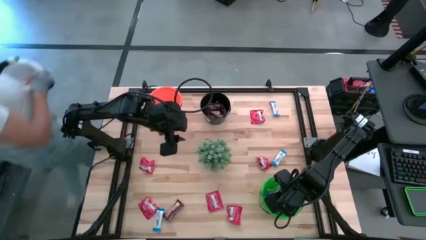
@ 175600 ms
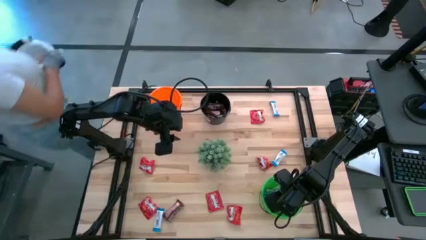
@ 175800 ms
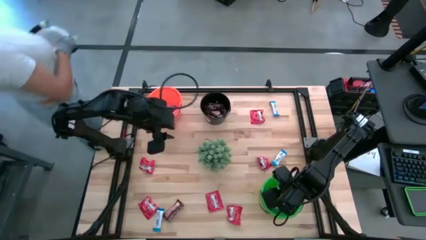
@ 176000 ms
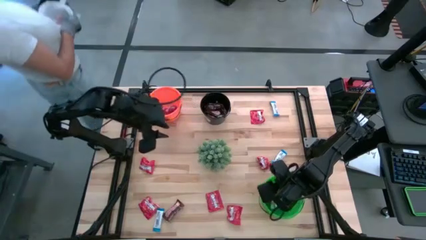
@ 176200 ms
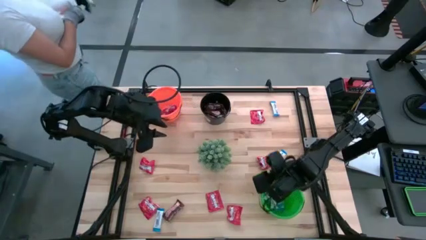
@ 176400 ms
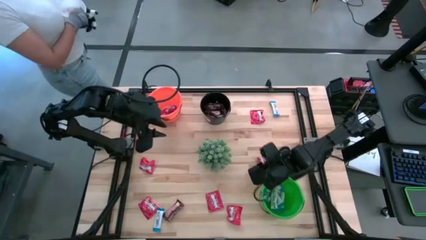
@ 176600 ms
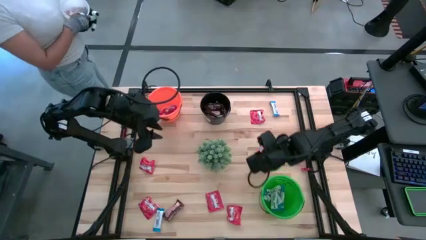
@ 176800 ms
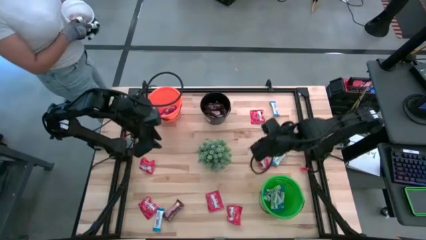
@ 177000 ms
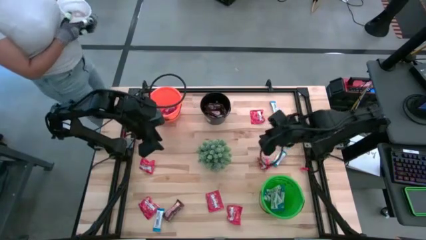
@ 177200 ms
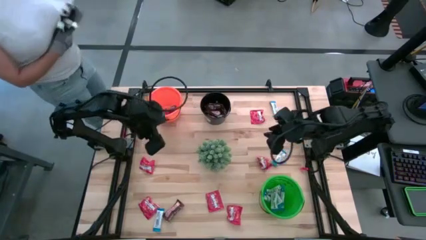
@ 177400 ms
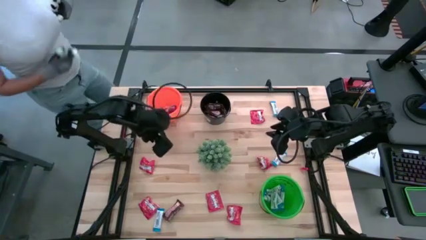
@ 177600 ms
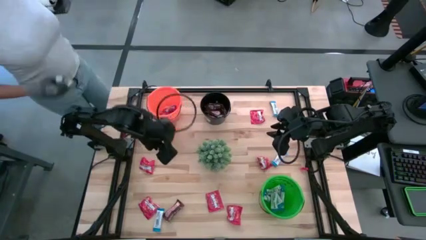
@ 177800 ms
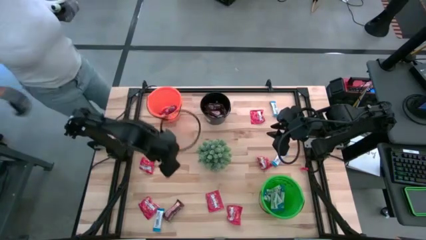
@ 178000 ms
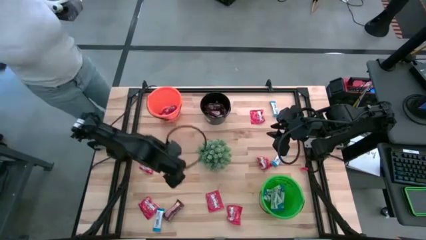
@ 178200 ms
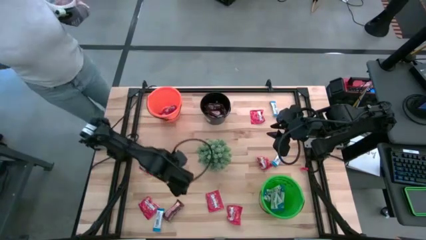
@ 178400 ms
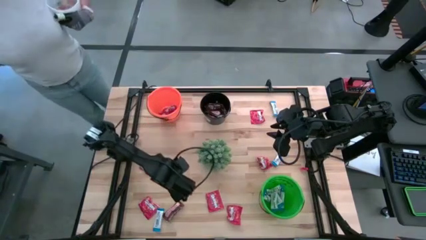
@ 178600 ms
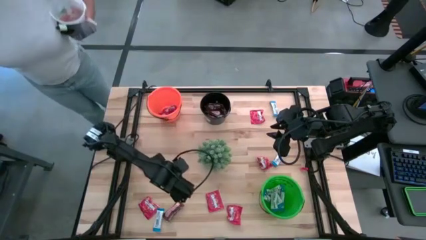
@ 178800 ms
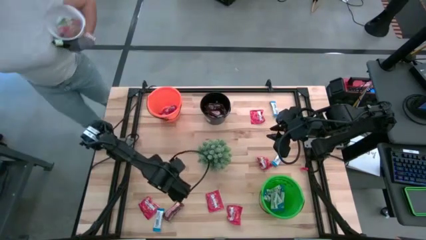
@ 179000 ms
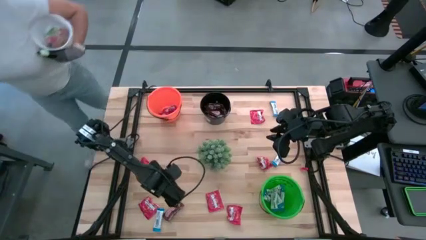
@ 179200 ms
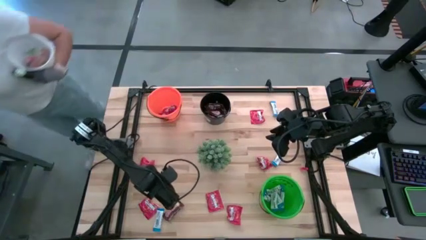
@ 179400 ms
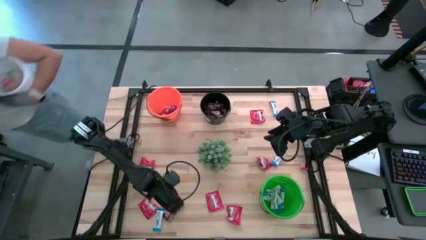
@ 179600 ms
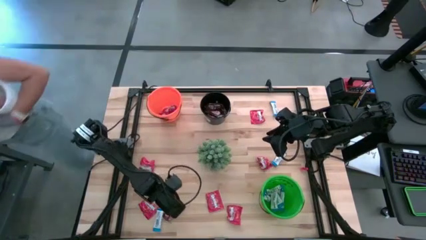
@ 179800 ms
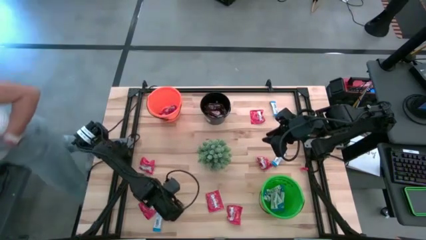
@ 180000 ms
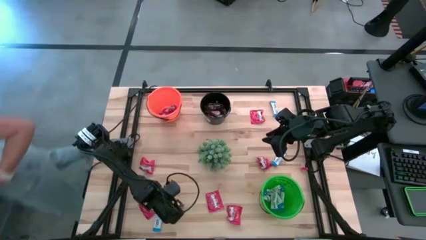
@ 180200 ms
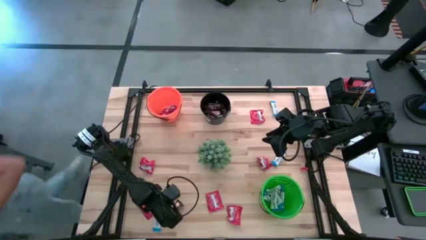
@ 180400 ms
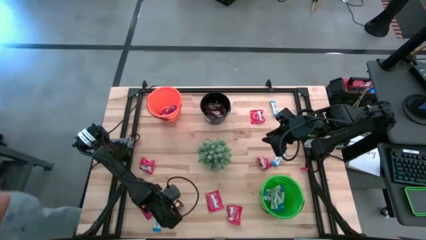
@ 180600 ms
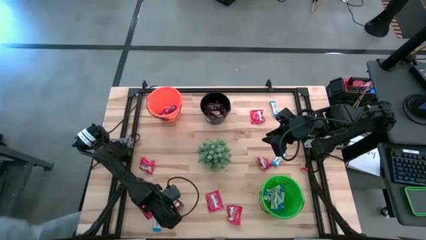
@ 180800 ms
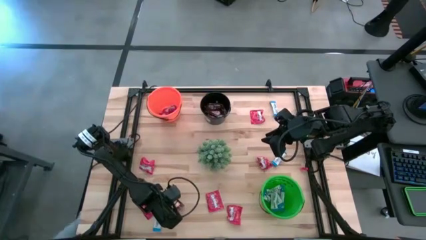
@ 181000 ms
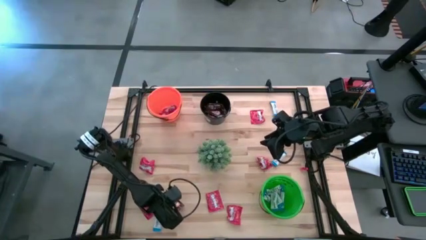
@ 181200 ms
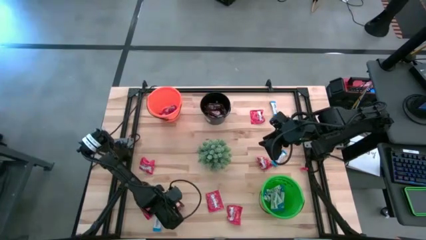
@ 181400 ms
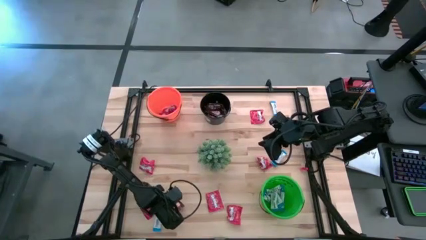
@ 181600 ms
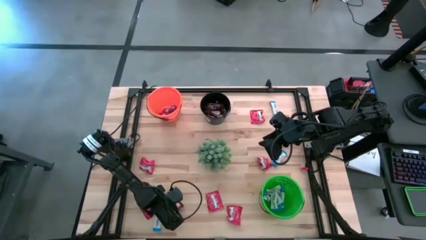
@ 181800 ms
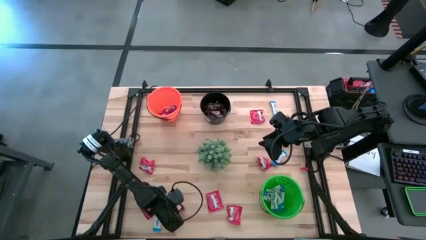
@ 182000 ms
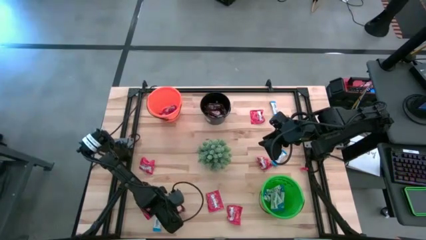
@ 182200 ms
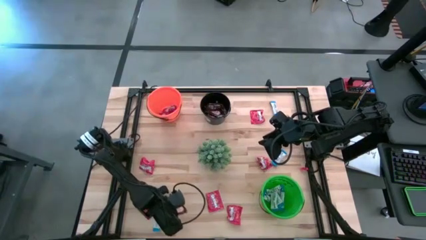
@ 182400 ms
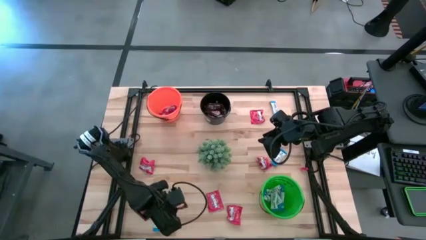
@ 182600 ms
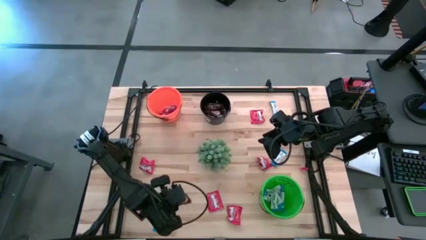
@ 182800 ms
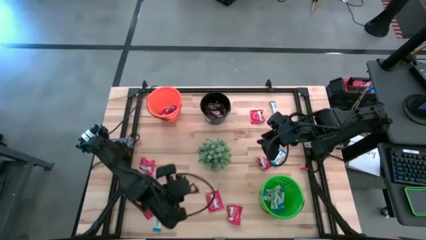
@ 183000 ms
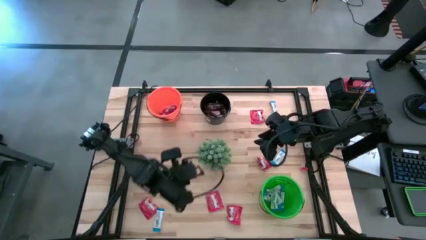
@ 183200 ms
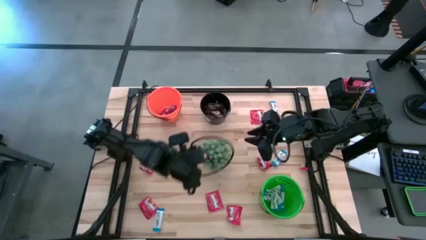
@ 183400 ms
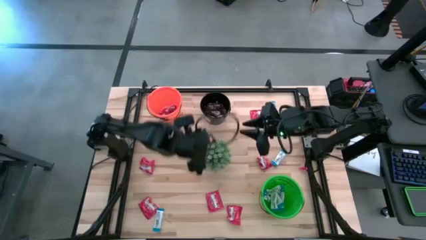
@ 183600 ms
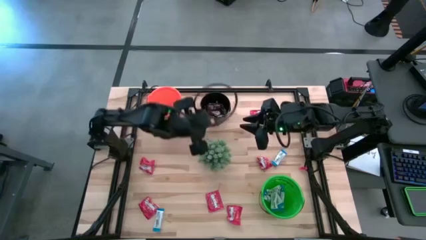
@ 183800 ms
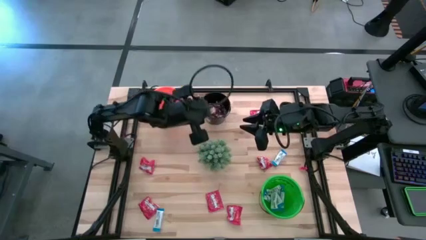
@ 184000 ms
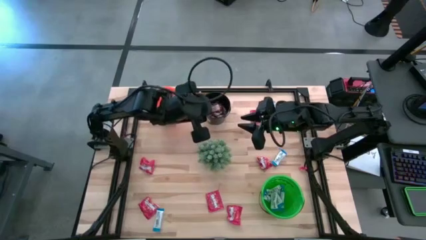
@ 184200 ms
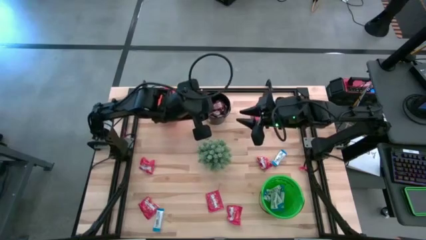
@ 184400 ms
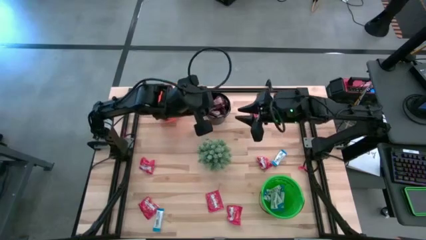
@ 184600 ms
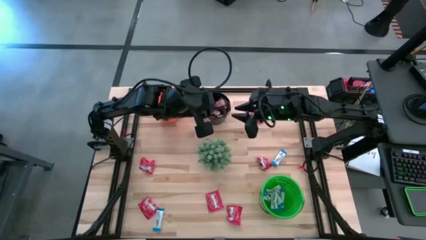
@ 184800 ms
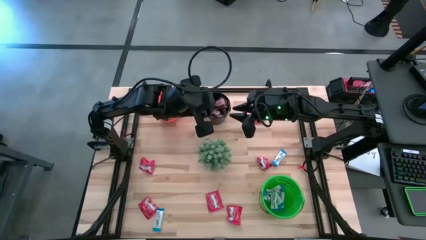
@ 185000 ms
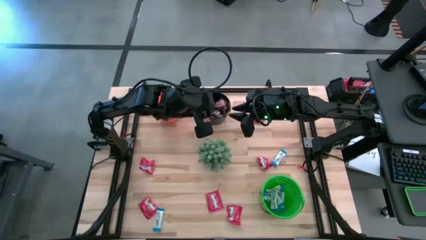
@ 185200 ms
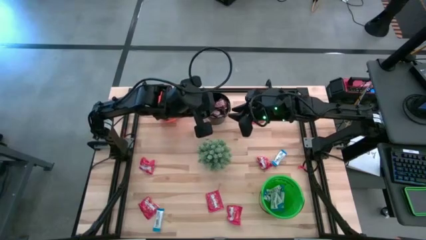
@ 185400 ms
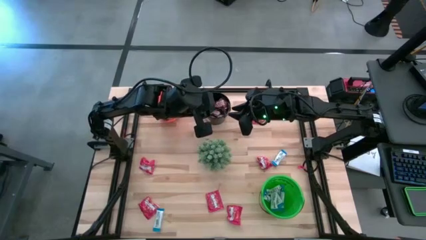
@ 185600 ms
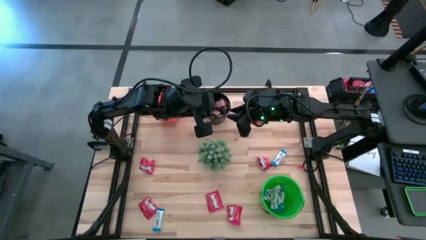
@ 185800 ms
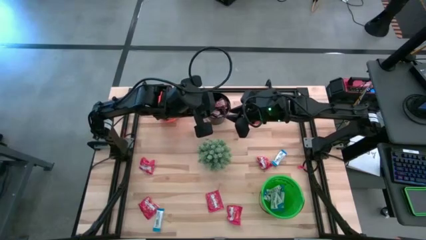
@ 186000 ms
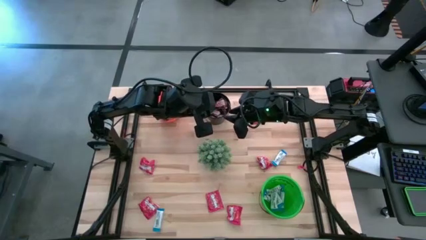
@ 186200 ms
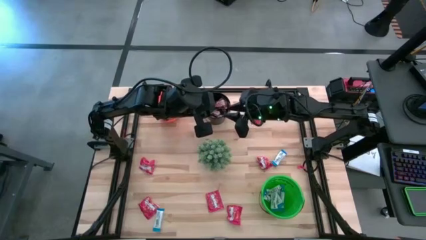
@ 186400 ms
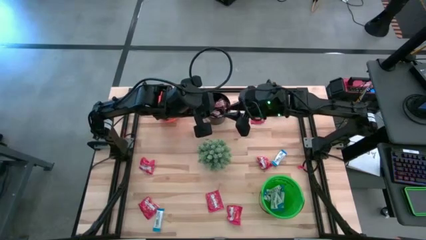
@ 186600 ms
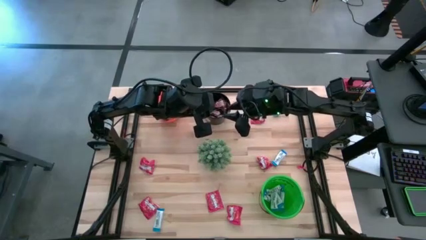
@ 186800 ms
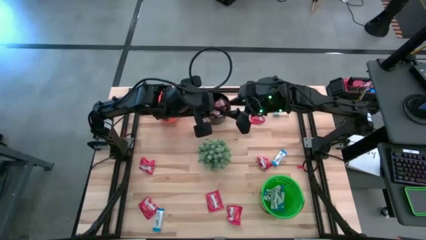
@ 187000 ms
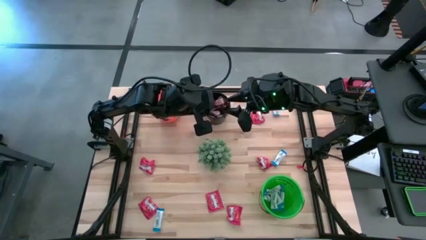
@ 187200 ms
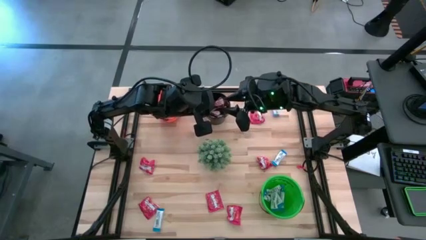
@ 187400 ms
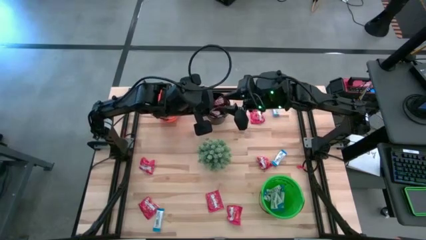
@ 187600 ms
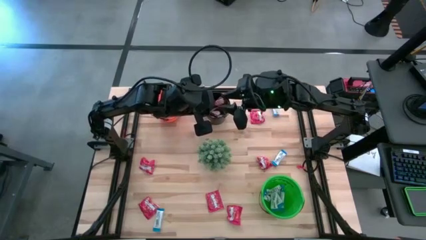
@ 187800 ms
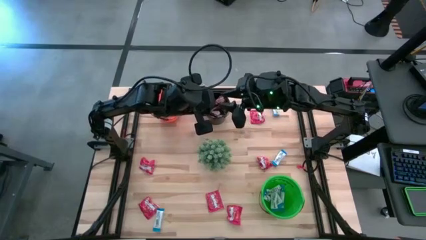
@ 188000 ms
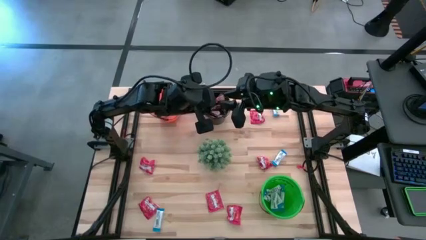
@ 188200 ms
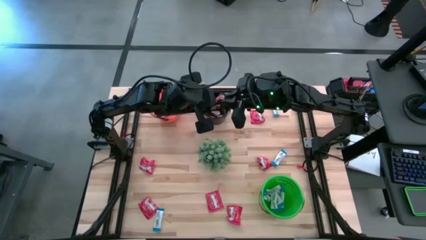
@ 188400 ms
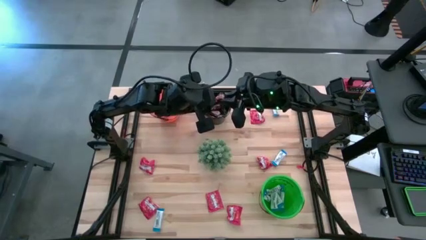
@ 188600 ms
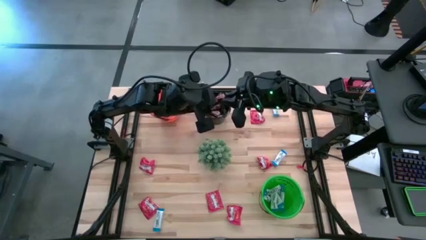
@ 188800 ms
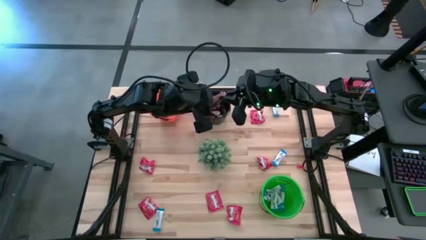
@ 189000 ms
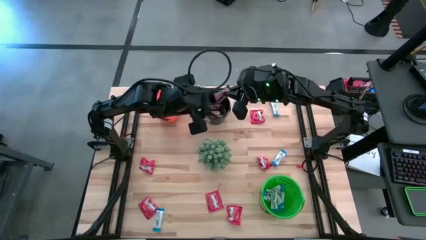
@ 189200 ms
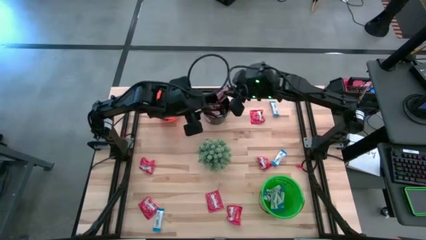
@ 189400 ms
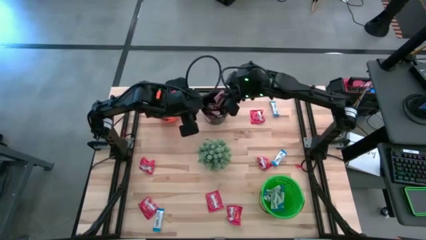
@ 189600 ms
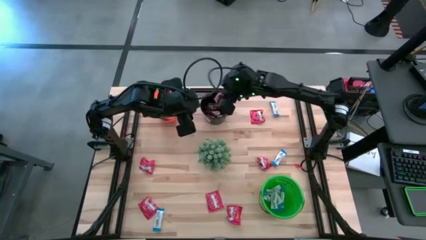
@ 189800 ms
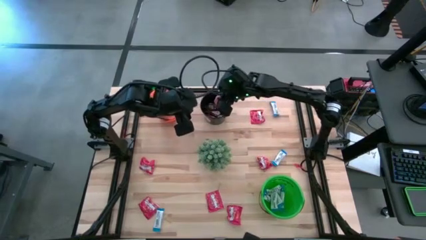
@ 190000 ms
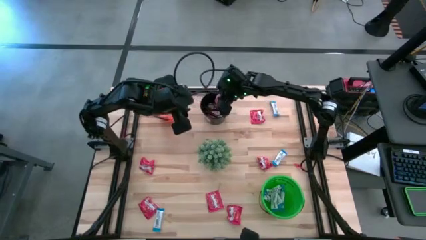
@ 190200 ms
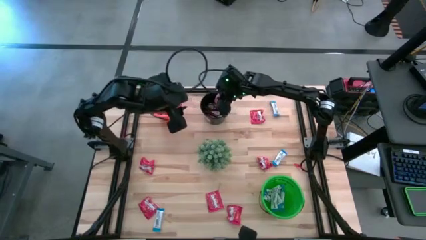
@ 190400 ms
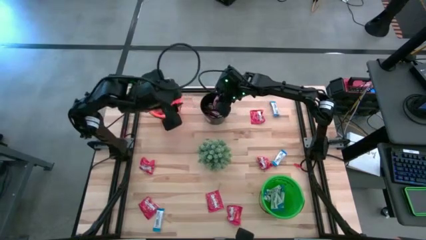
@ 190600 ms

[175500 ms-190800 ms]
Task: Sort candy
Put the brown chocolate into the black bucket

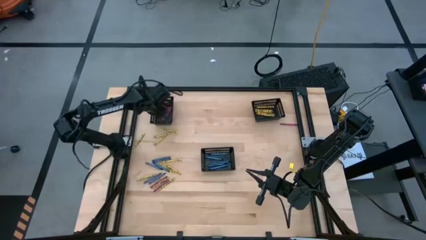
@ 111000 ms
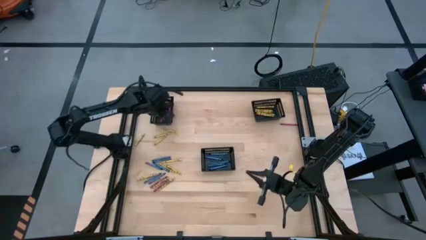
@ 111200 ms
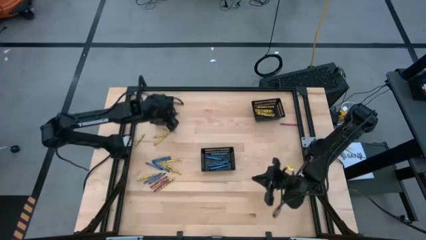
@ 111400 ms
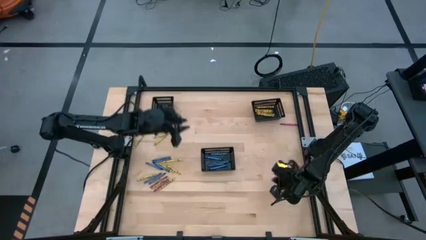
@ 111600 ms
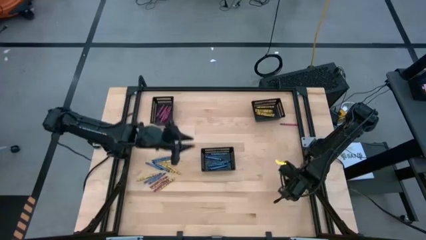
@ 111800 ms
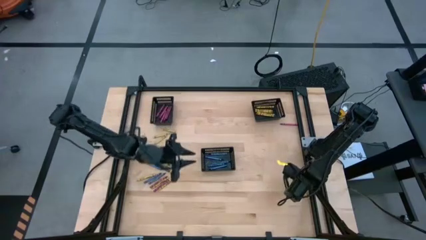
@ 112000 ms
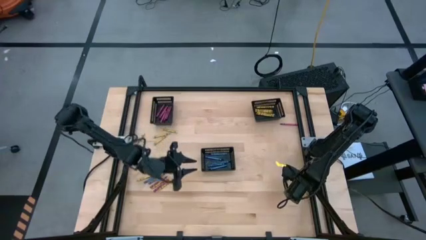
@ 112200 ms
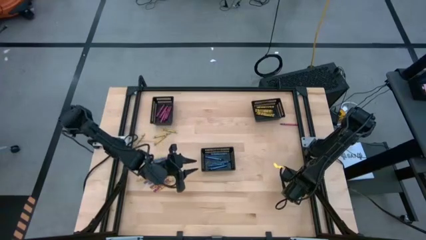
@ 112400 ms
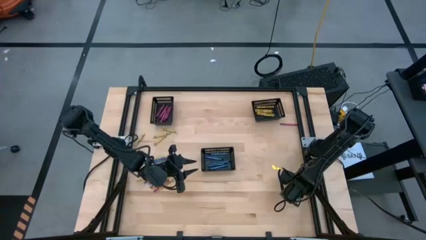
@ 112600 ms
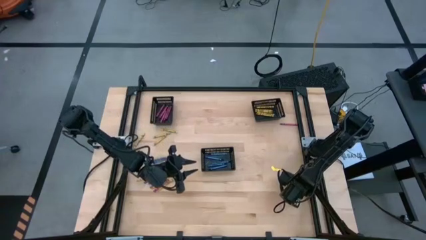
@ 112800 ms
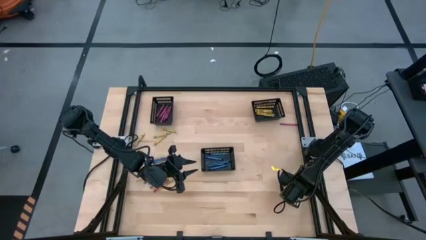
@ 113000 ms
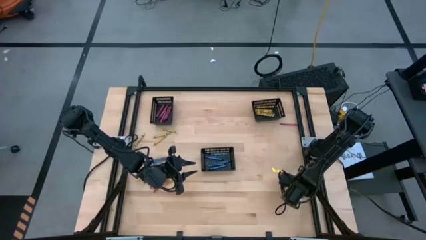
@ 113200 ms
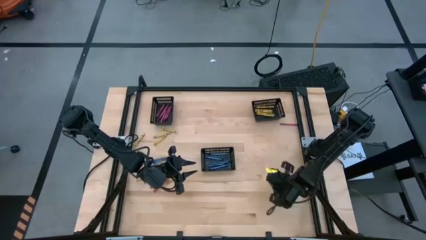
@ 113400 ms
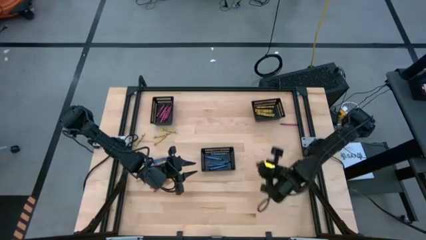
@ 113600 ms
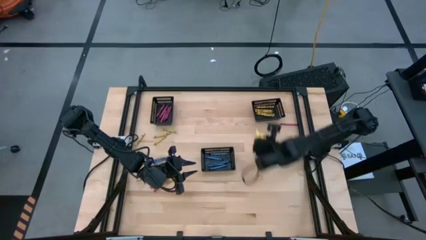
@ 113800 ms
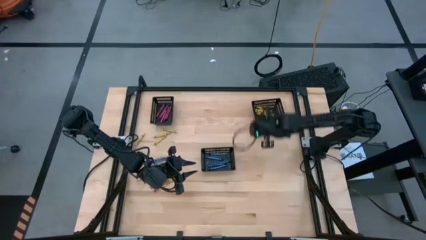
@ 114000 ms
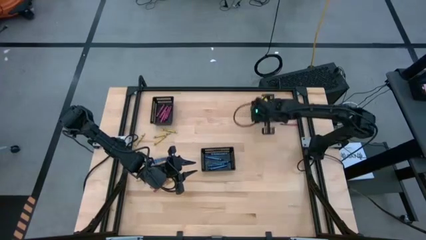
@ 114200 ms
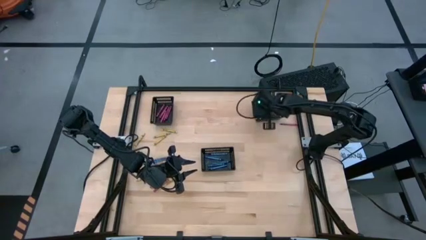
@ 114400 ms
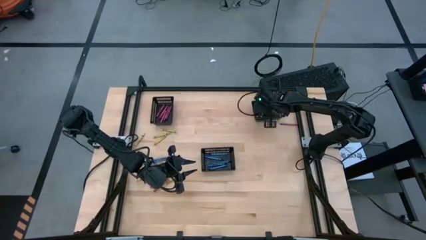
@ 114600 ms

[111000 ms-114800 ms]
Task: Sort crayons
Put the yellow crayon into the top right black bin
